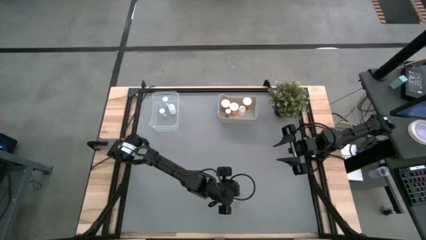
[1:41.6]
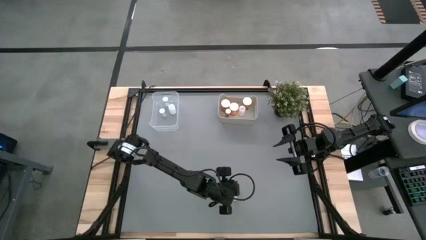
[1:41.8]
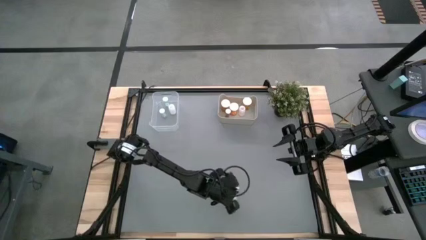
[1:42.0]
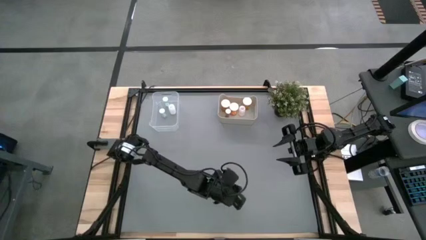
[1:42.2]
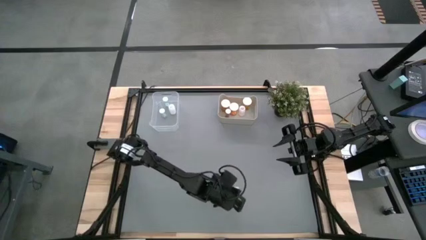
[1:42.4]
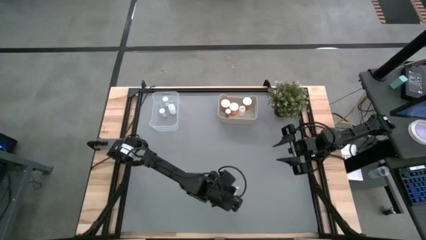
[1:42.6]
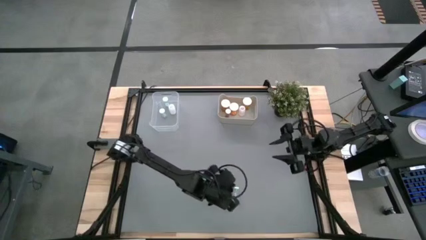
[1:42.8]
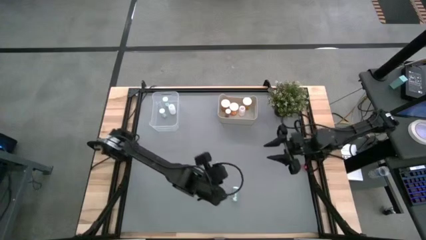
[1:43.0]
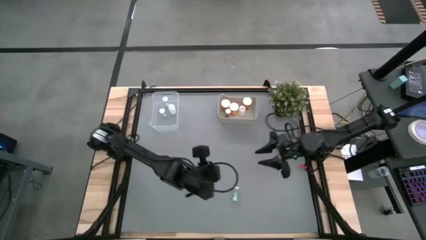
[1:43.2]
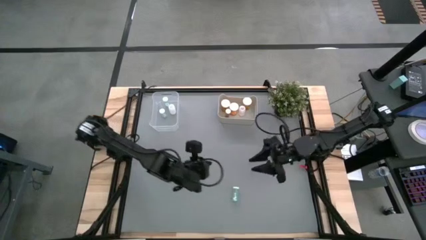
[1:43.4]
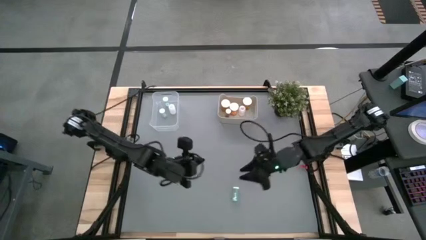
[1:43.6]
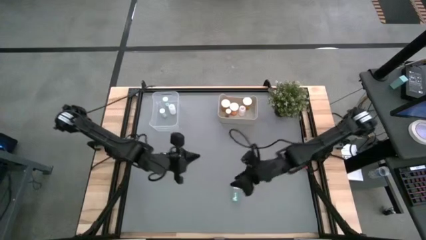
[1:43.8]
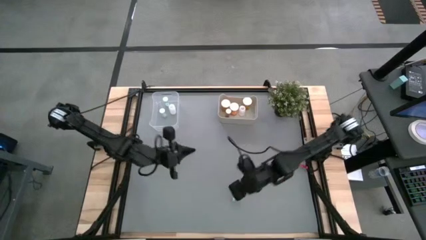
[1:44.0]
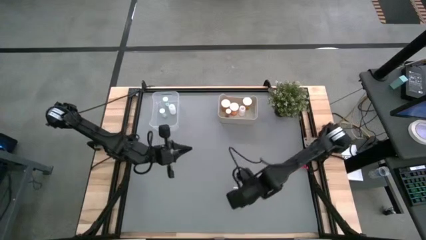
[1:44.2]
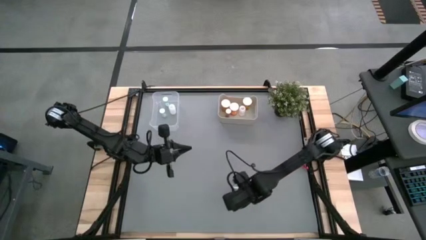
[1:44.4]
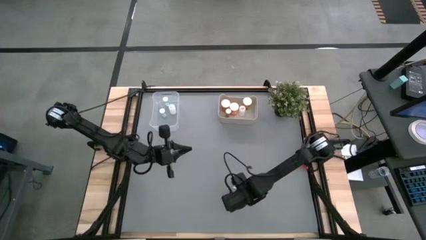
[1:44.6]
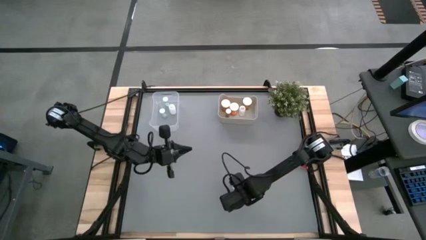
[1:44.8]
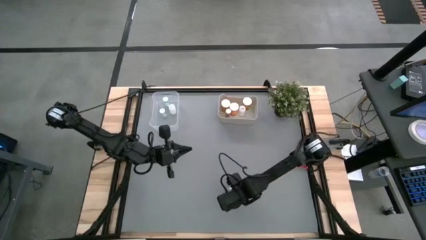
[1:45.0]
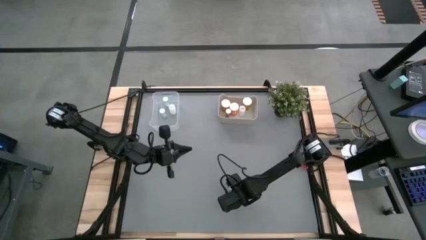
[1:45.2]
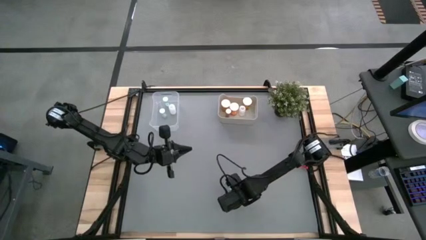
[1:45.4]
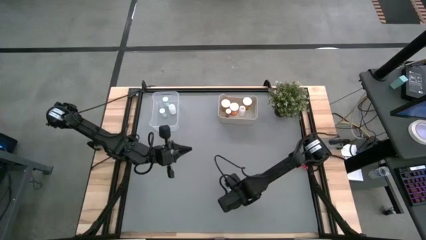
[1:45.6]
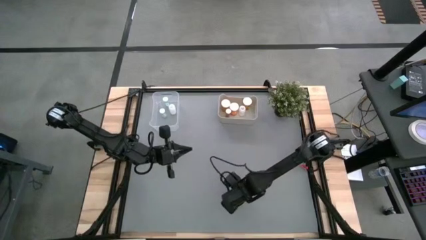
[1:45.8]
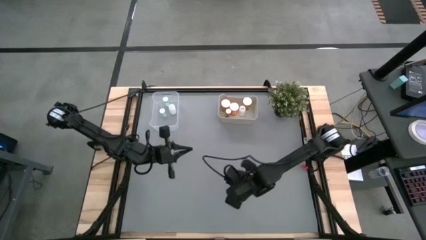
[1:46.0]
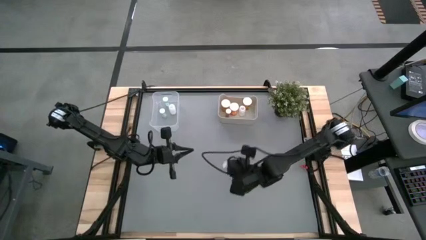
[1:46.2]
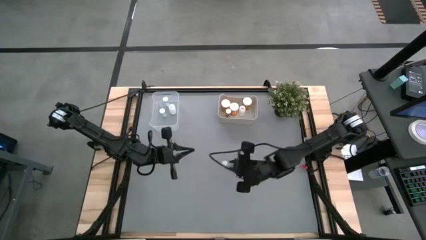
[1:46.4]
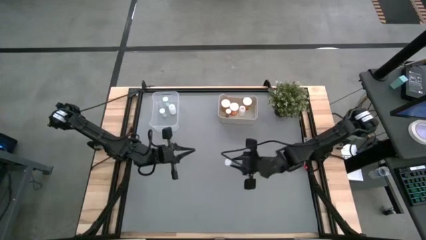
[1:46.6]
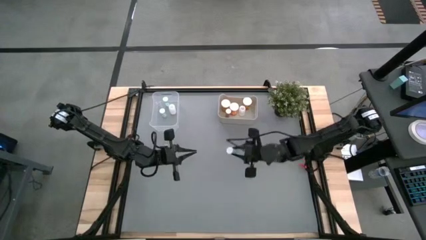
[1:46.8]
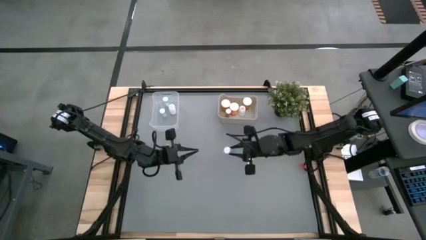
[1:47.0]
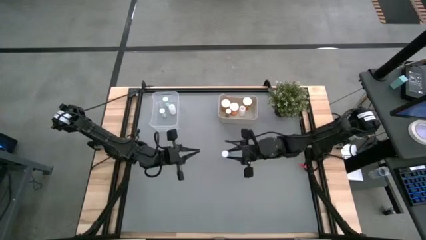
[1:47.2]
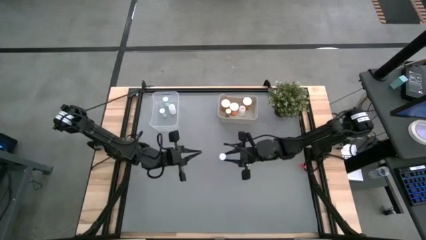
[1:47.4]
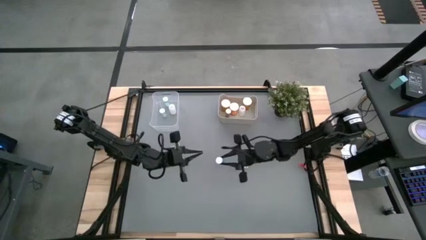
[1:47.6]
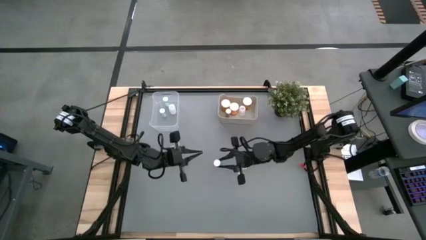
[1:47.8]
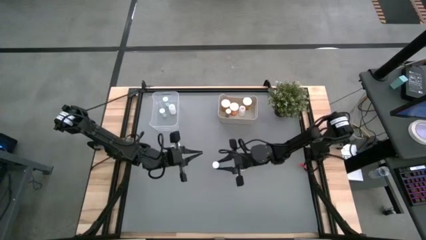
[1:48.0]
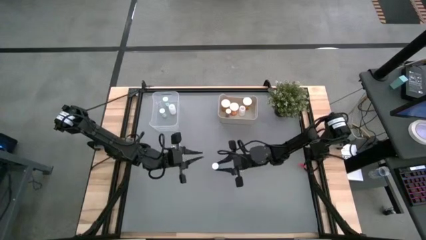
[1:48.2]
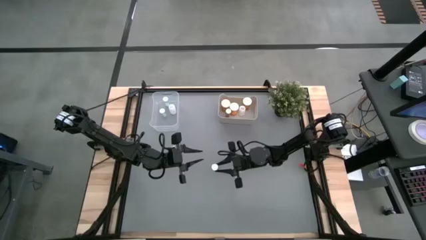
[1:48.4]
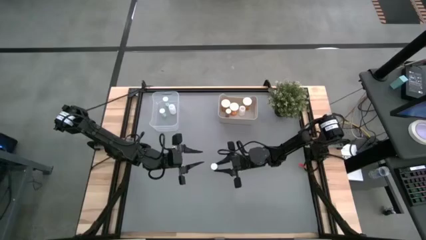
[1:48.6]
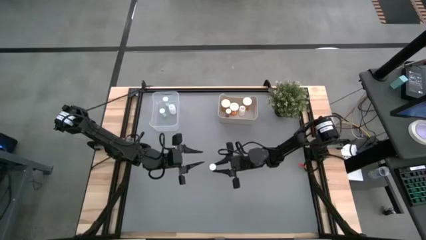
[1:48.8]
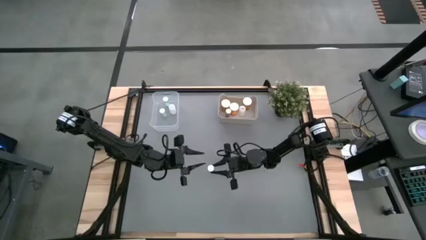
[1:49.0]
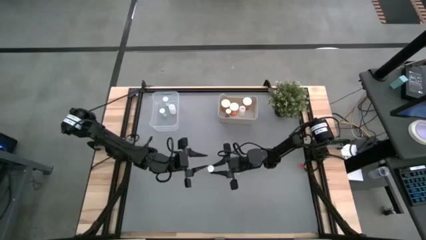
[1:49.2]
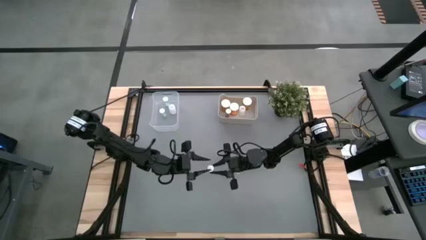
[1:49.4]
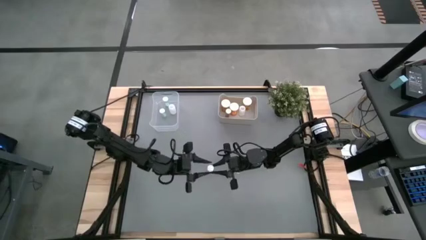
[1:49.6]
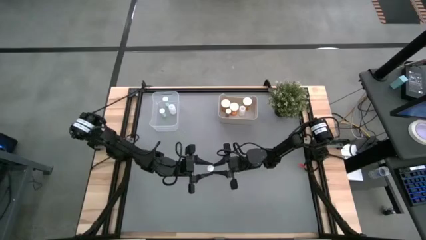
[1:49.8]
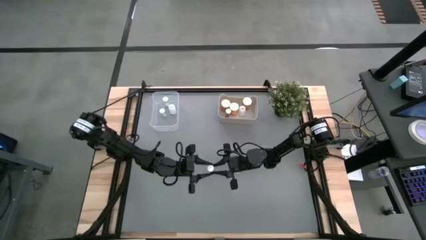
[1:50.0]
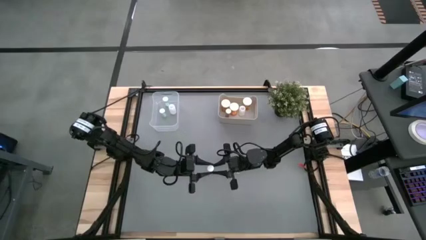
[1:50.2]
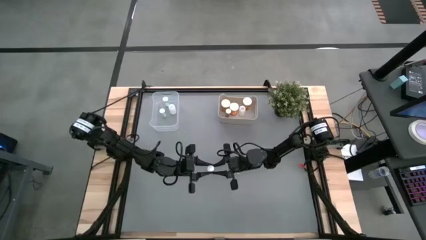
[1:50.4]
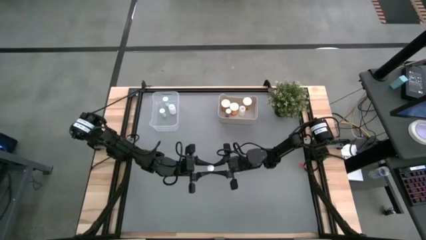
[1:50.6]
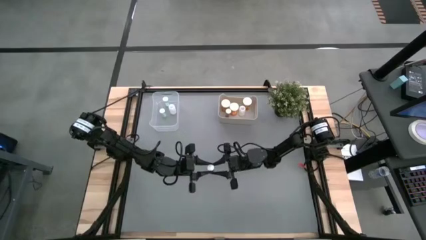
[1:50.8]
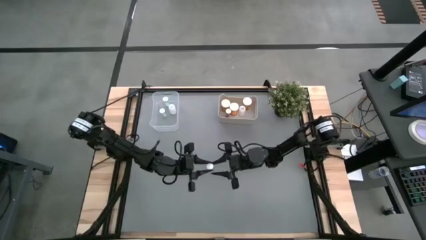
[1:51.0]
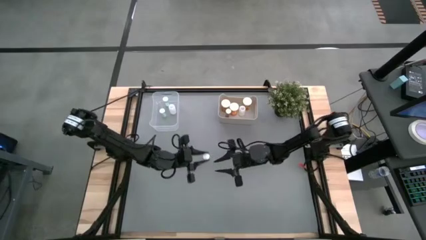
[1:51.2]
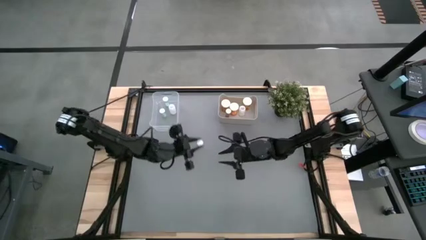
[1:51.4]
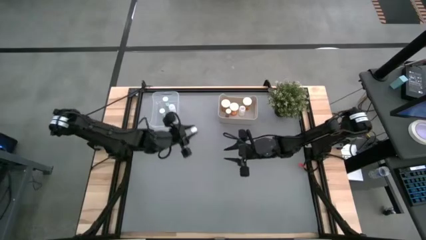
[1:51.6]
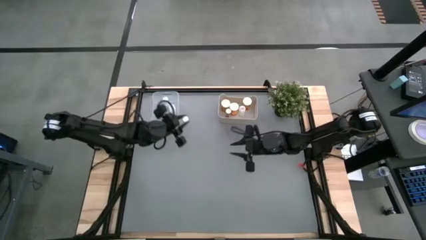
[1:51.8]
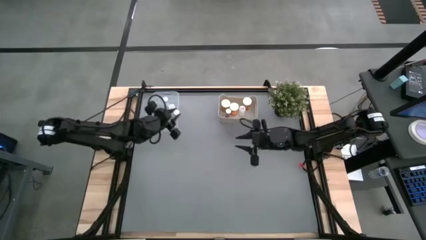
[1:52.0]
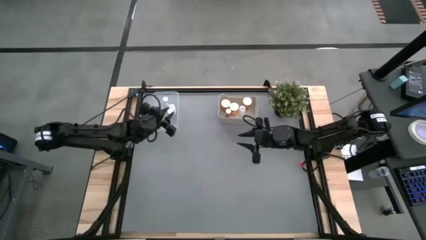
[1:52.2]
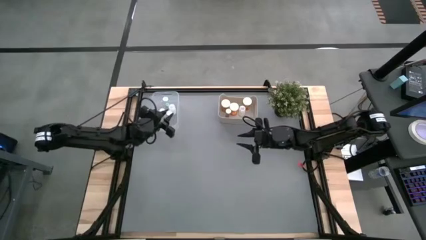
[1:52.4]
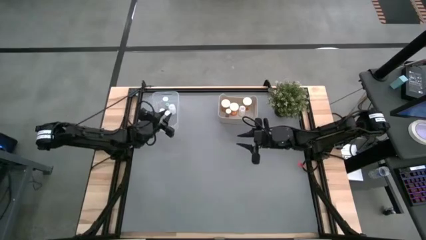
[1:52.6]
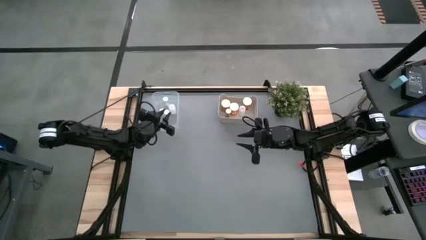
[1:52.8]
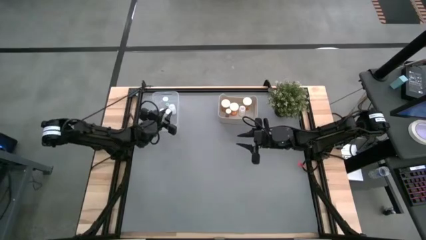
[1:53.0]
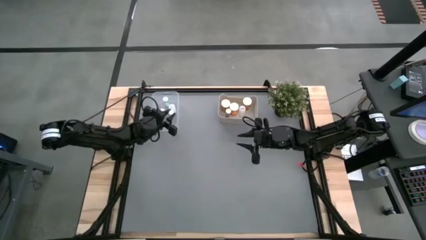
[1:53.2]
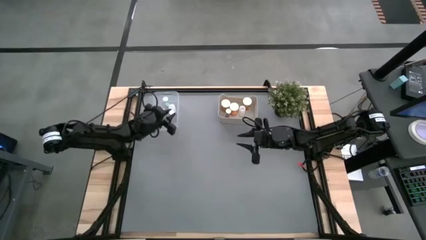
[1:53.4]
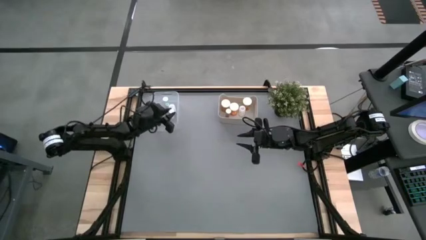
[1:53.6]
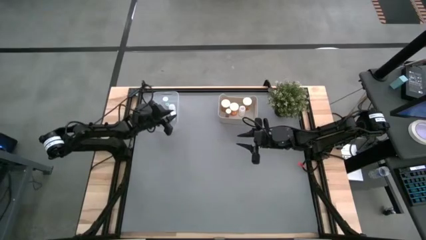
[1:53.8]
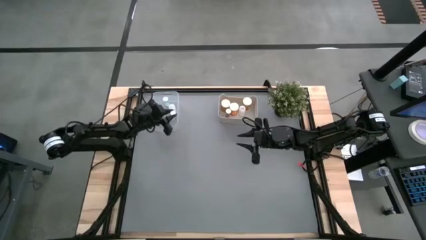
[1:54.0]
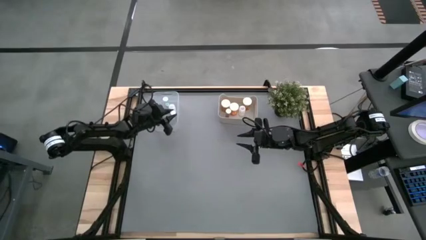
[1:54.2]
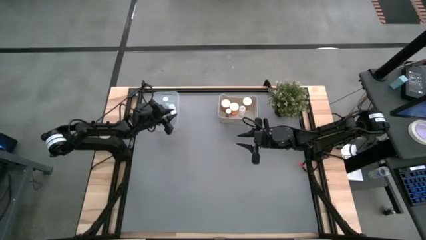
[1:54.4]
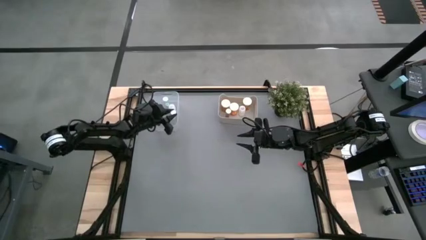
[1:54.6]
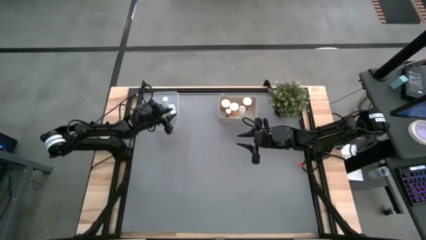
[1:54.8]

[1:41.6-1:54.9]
Task: Pick and place medicine bottles into bin by pill shape (circle, oval)
Put the blue tablet bottle into the transparent bin

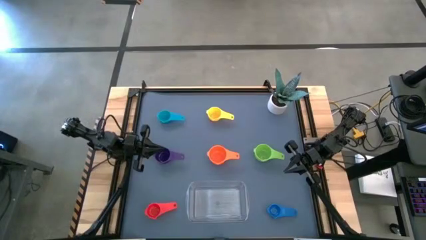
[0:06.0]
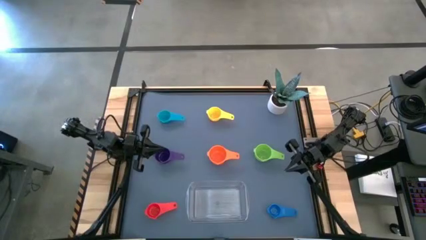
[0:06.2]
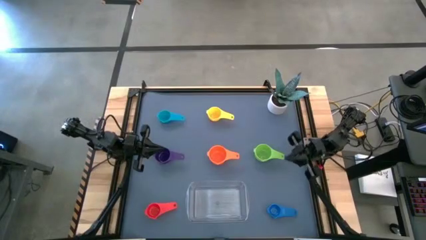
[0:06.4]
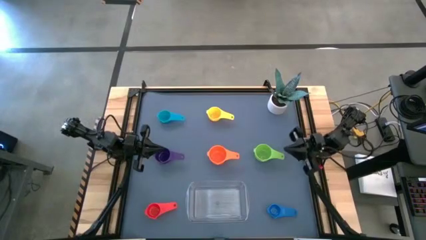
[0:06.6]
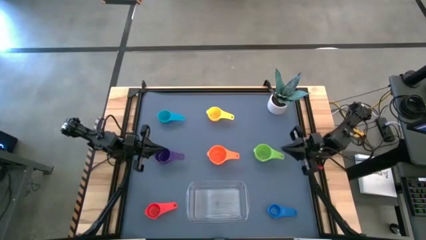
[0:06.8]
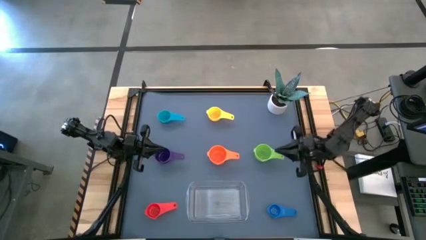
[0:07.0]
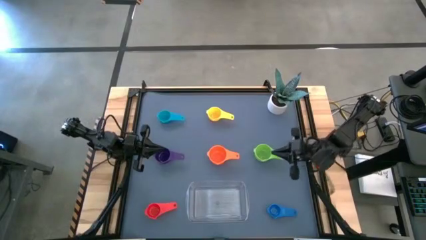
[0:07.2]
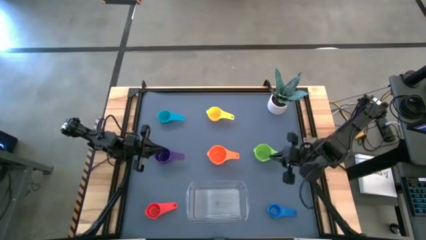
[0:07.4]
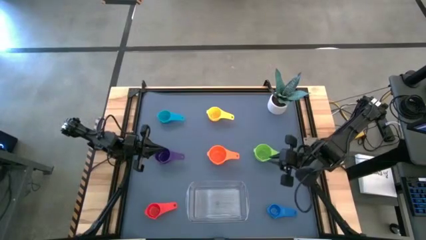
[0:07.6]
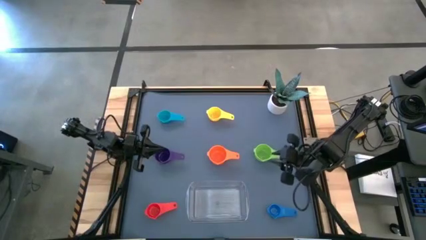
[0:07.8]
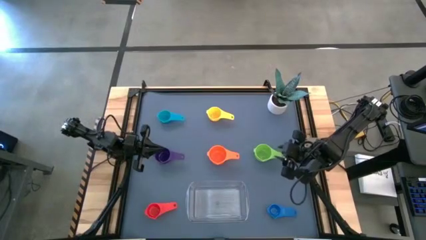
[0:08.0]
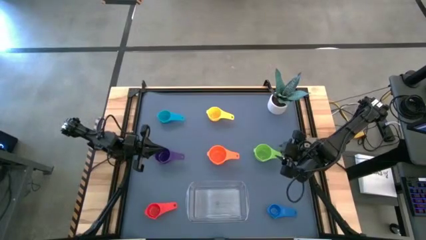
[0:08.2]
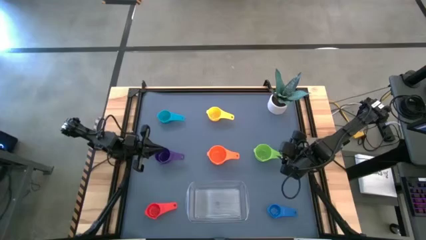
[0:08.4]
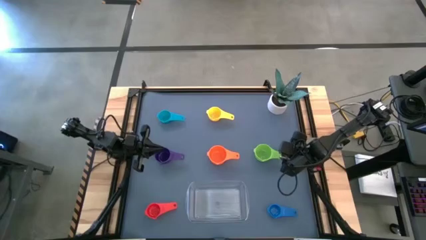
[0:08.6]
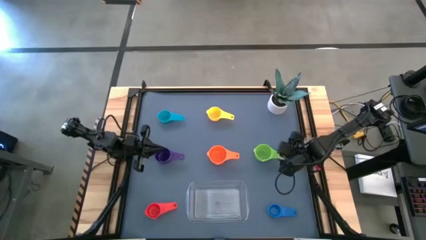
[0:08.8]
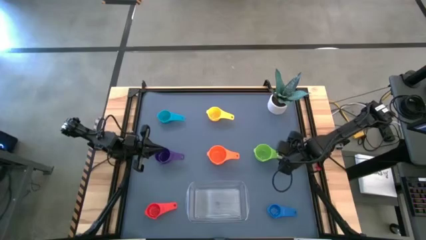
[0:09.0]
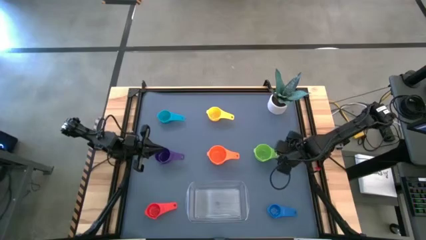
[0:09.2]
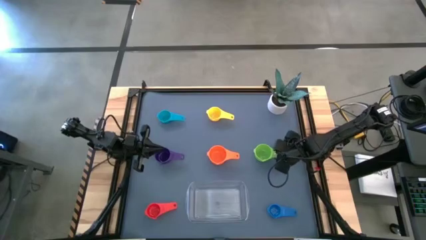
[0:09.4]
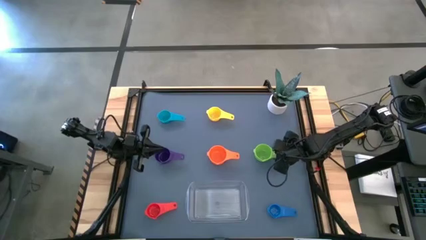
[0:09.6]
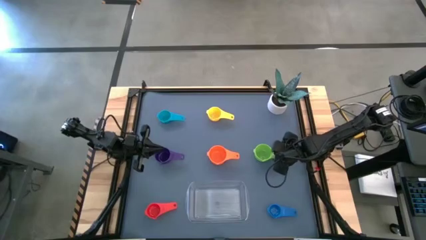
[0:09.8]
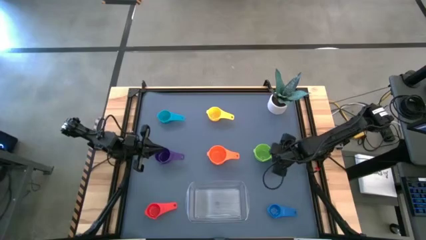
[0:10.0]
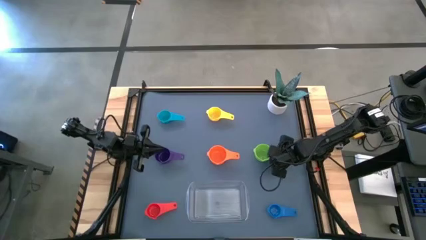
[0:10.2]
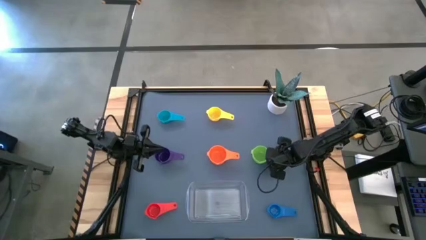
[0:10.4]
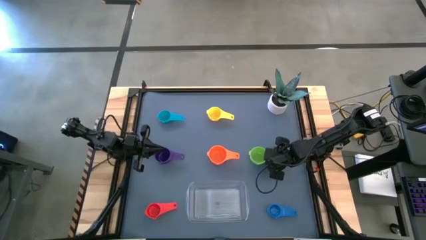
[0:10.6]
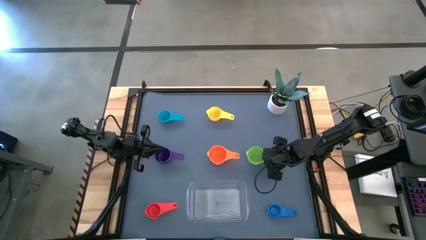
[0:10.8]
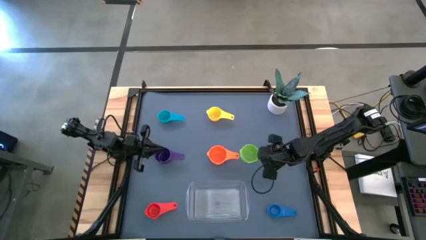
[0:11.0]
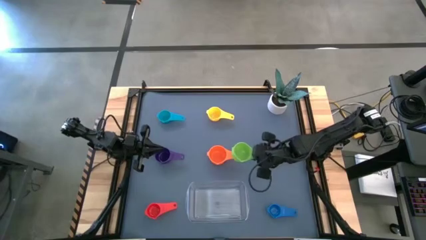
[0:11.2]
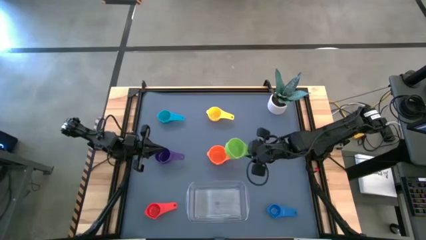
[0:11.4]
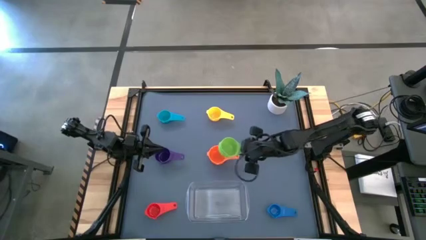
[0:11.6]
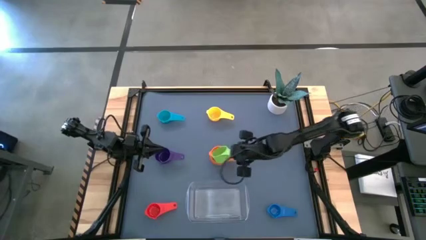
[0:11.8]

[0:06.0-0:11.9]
Task: Nest measuring cups in basket
Stack the green measuring cup on the orange measuring cup
